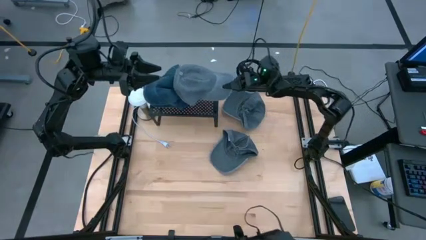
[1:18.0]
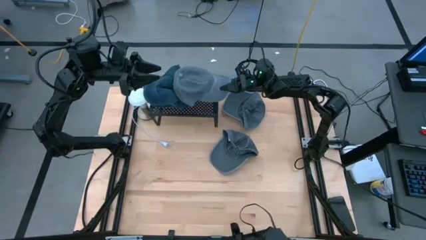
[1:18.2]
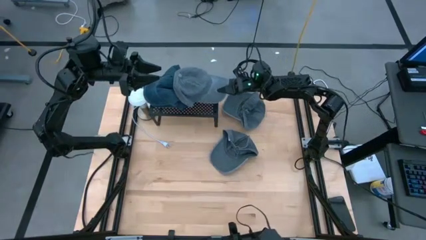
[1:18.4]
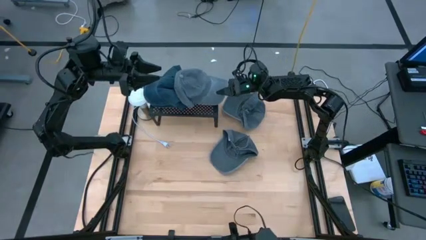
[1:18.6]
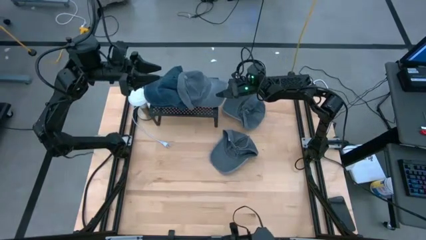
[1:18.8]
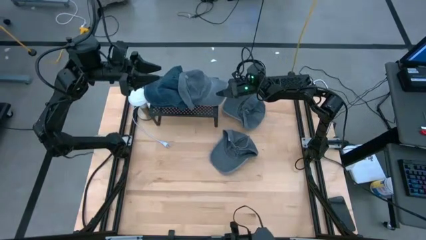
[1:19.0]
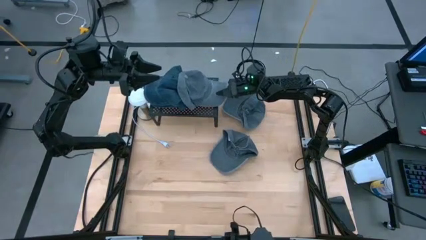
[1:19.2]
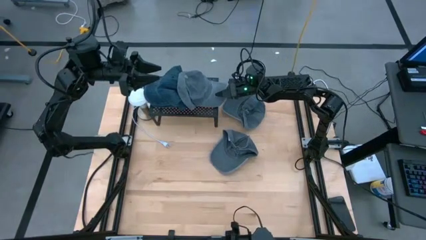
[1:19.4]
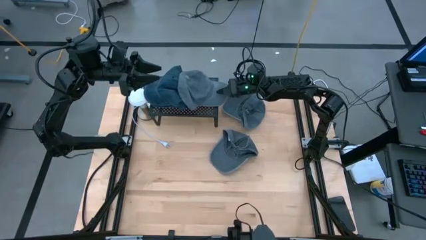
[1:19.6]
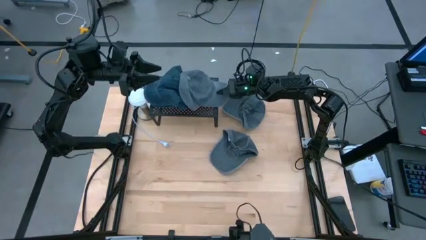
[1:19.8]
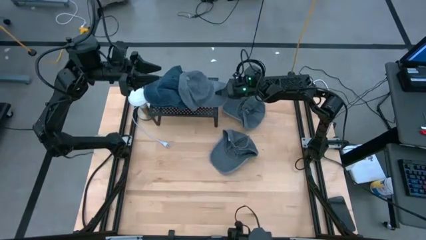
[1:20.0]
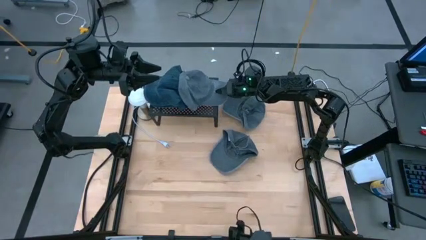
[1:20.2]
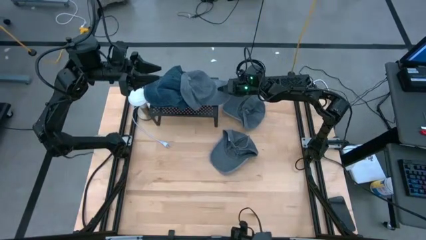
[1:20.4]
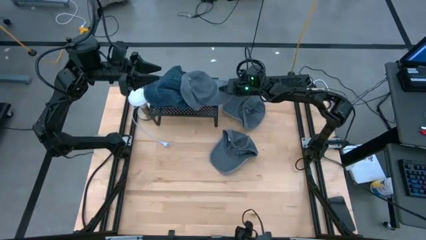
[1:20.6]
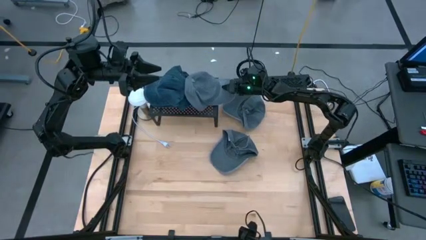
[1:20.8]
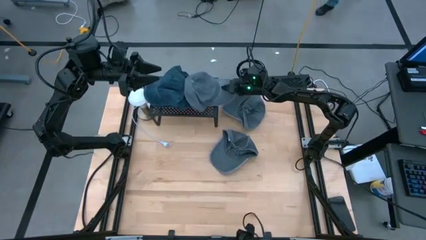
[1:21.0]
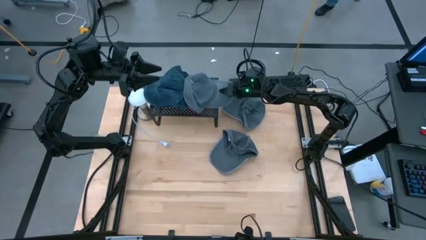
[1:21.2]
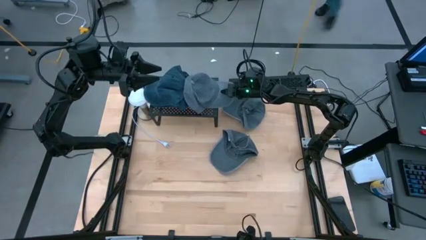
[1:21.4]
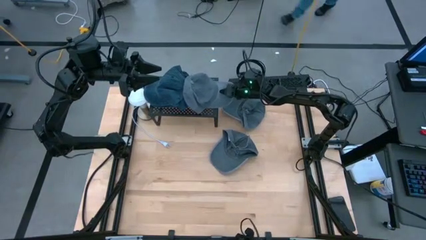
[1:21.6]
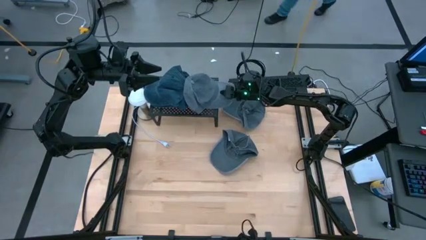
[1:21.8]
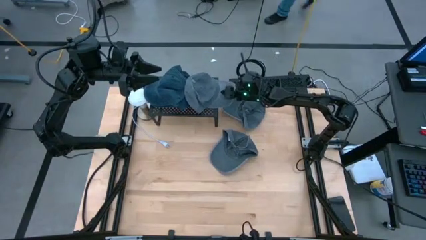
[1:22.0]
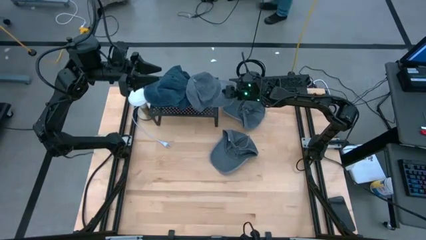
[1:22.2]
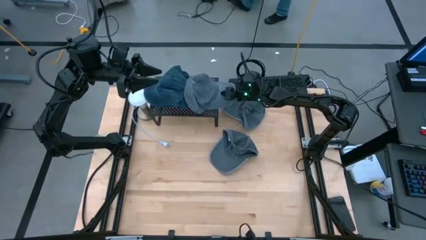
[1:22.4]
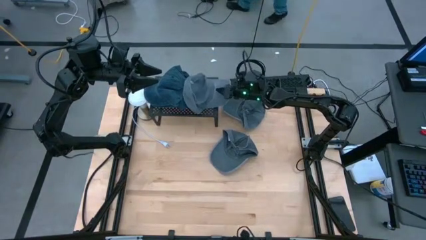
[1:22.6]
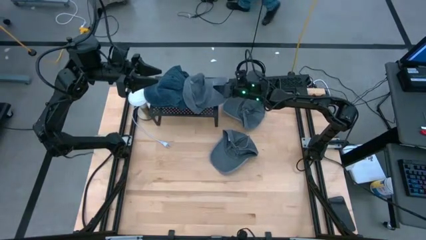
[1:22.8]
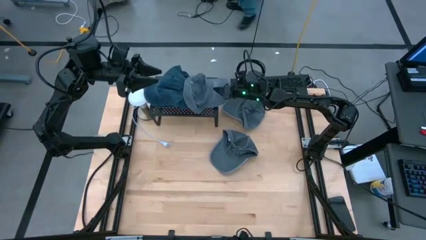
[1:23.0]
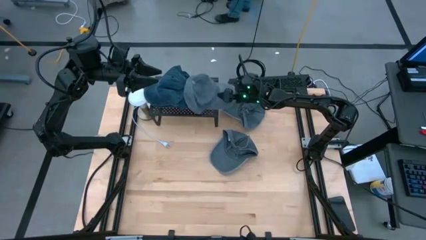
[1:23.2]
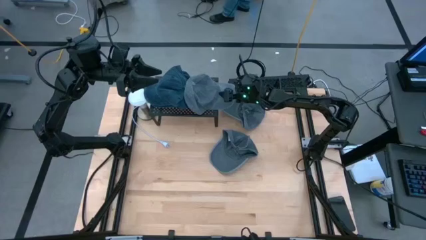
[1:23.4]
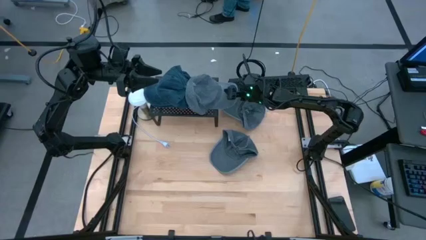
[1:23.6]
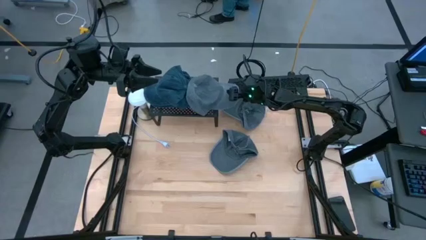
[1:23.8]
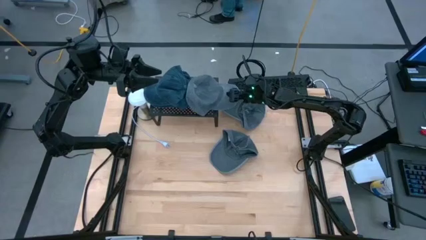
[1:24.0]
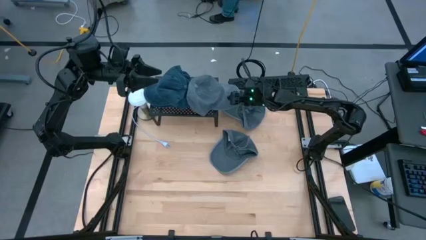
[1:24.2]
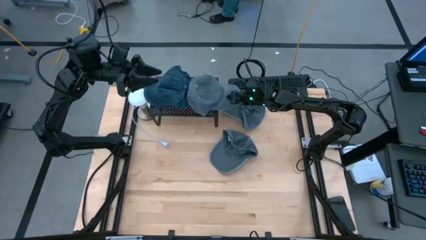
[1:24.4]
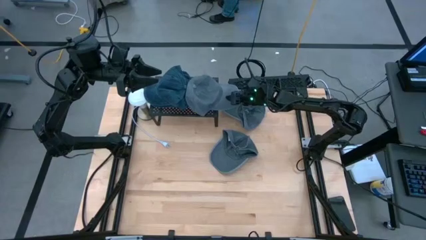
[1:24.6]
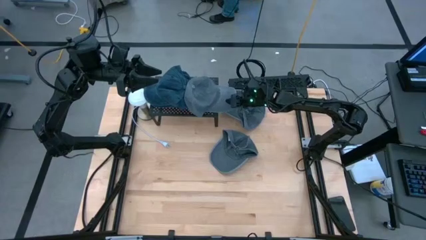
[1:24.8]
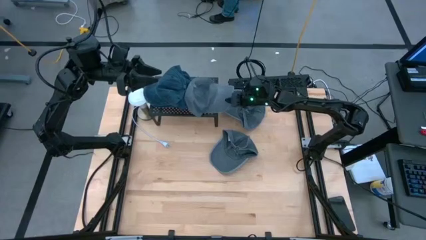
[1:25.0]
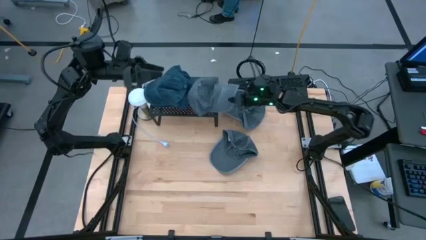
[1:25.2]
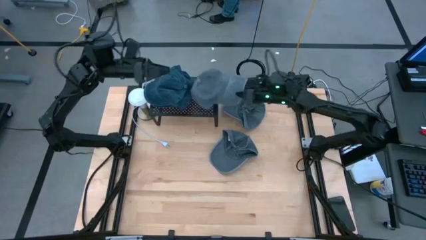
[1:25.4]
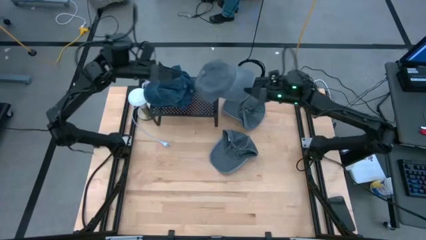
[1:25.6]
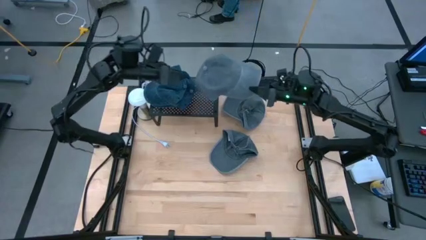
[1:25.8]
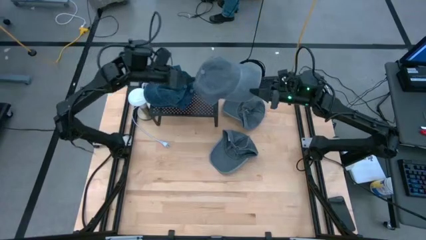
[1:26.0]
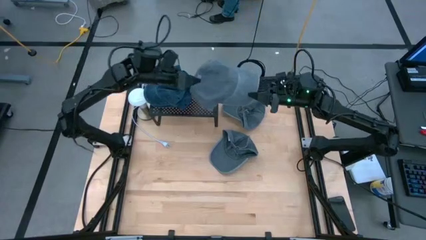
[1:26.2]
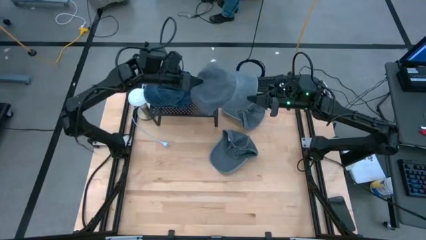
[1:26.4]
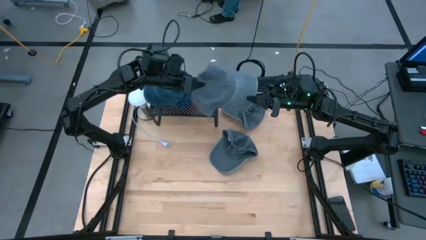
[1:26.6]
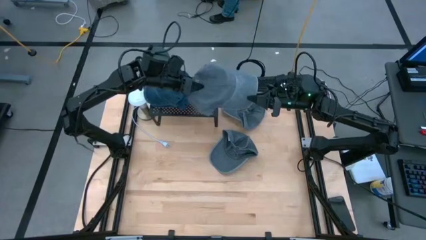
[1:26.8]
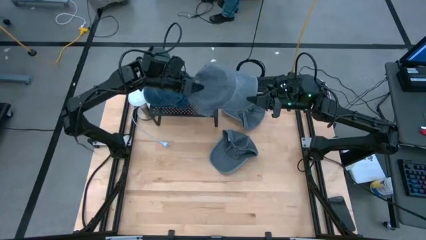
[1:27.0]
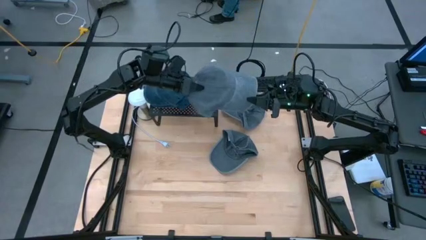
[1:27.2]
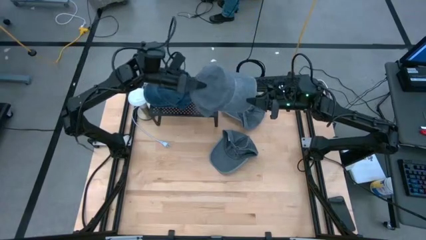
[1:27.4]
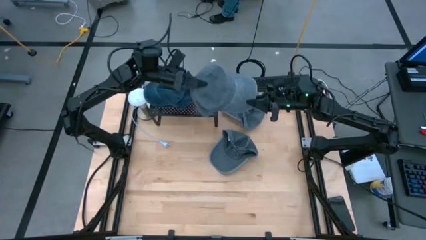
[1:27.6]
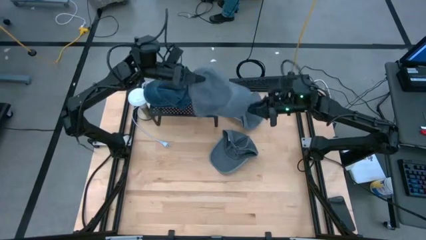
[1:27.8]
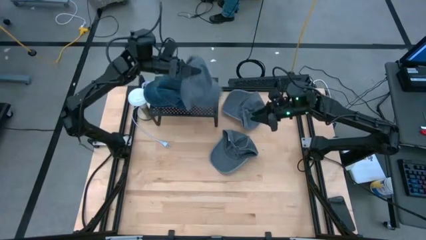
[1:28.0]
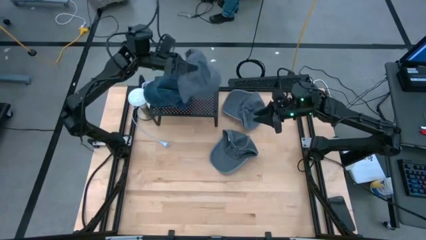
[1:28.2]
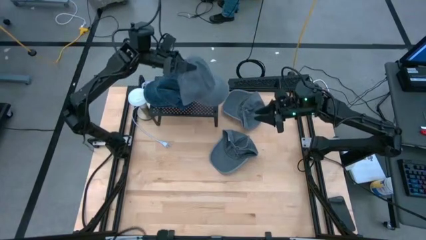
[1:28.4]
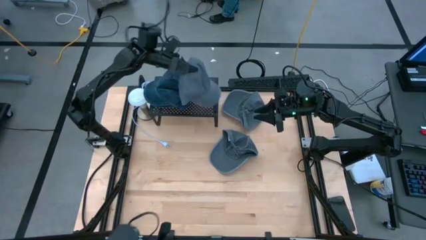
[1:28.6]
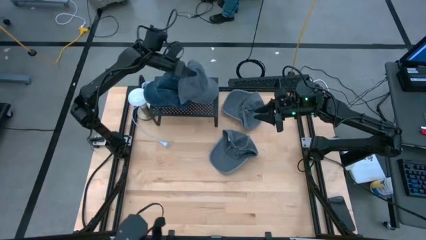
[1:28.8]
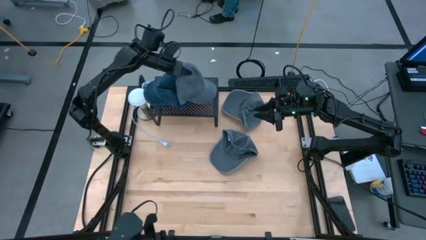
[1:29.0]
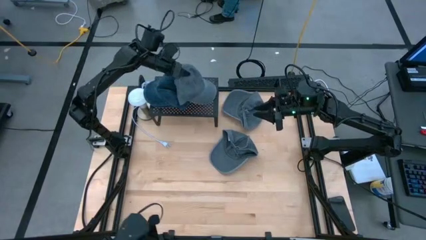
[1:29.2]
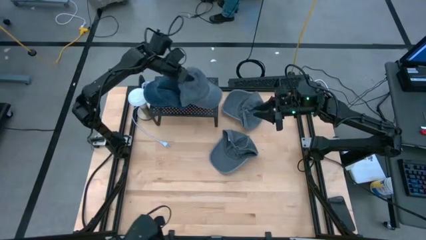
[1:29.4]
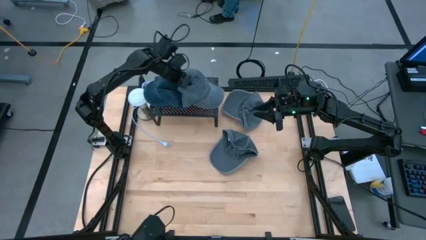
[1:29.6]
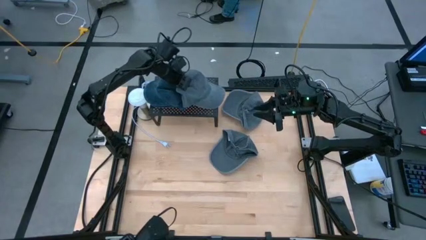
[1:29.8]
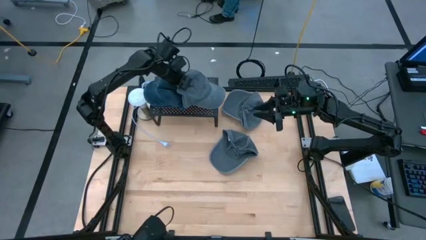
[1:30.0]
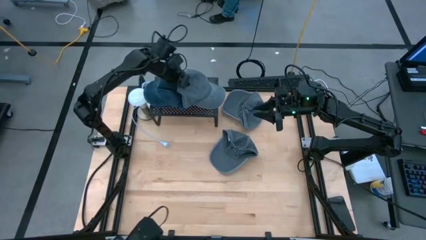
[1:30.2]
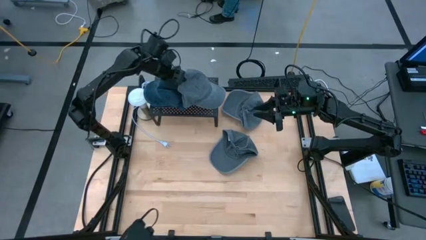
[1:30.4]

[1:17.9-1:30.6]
Task: Pick & Place hat
Put the bottom left gray cap on the shelf
